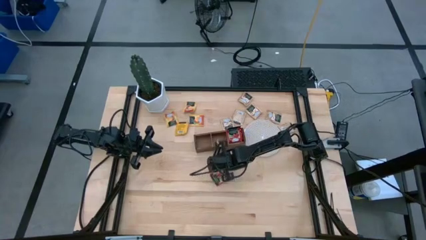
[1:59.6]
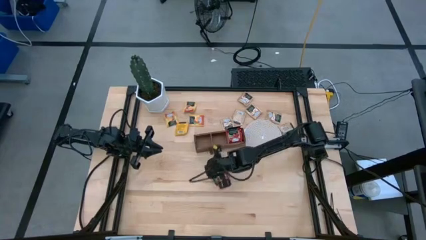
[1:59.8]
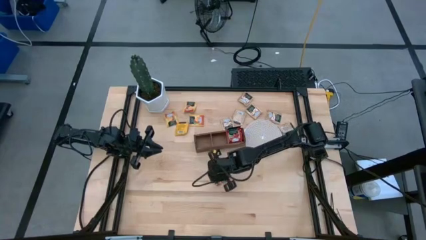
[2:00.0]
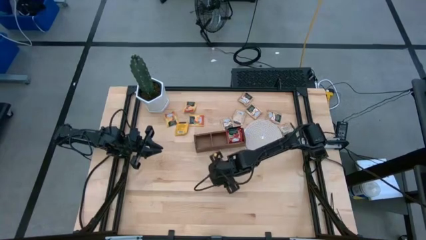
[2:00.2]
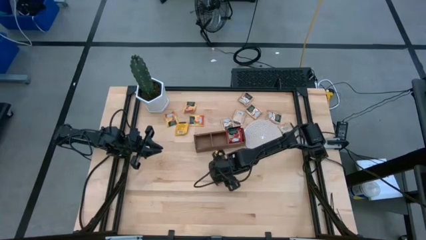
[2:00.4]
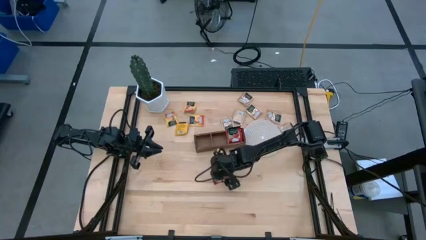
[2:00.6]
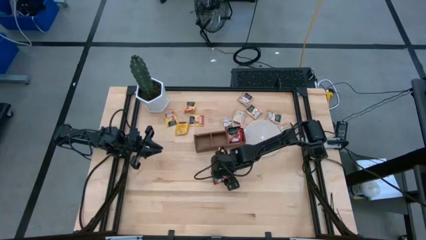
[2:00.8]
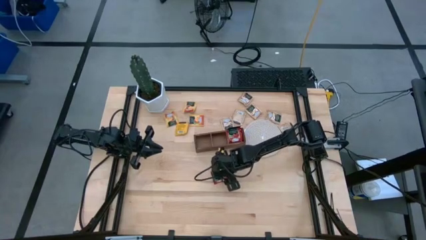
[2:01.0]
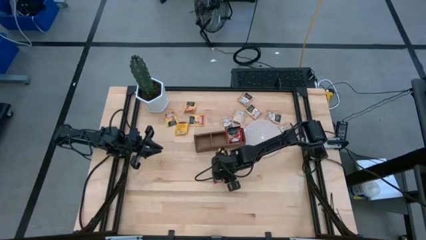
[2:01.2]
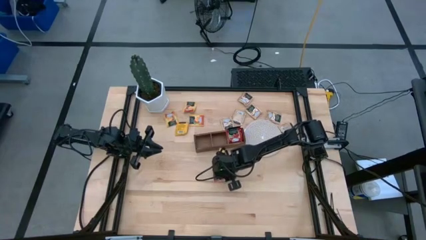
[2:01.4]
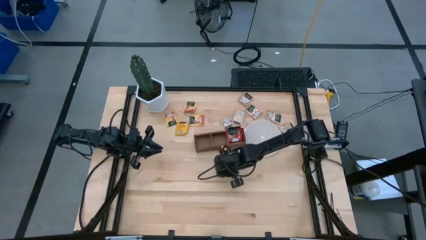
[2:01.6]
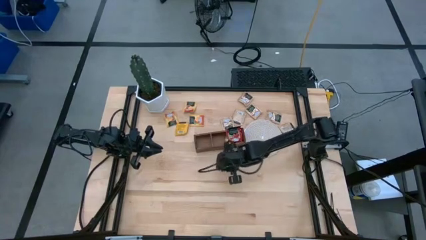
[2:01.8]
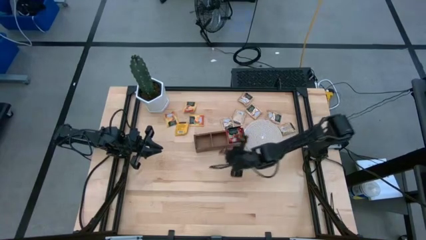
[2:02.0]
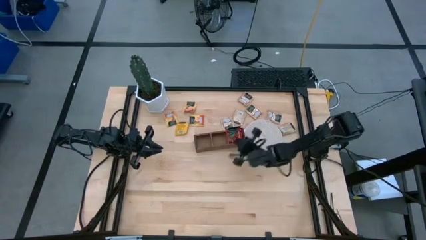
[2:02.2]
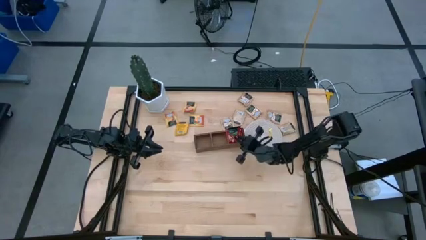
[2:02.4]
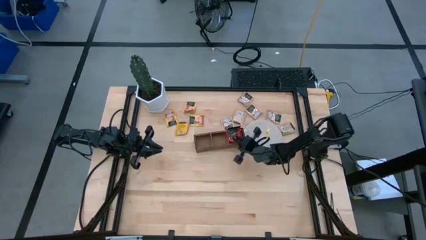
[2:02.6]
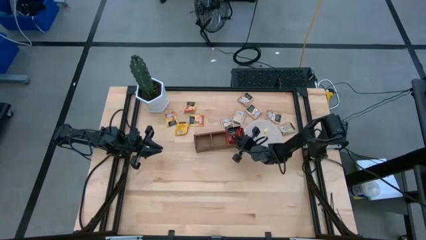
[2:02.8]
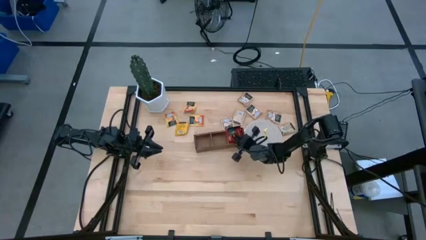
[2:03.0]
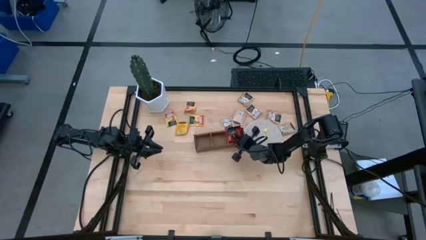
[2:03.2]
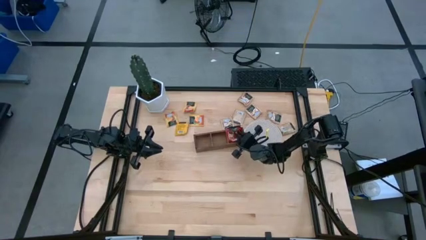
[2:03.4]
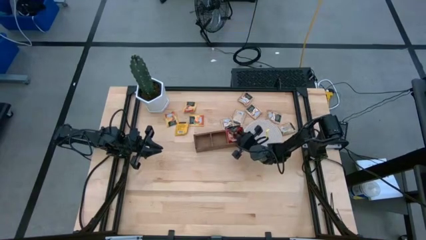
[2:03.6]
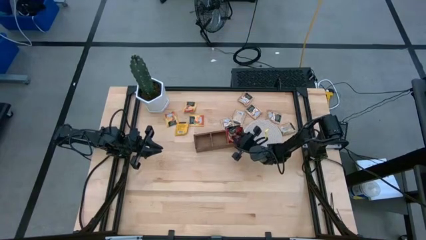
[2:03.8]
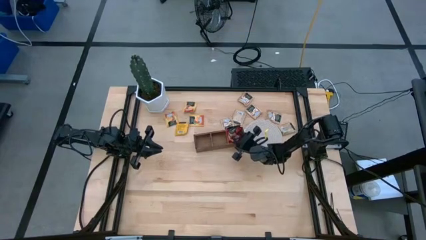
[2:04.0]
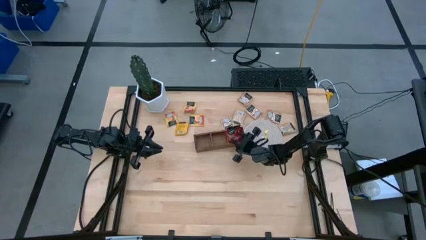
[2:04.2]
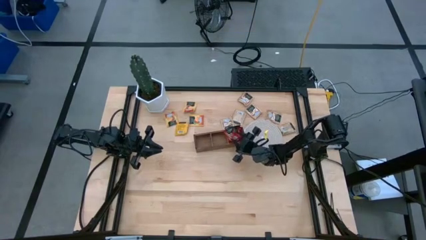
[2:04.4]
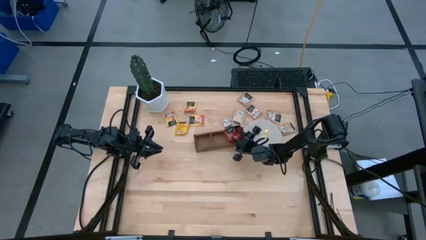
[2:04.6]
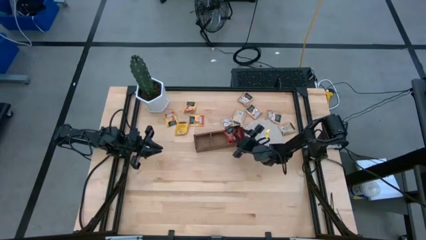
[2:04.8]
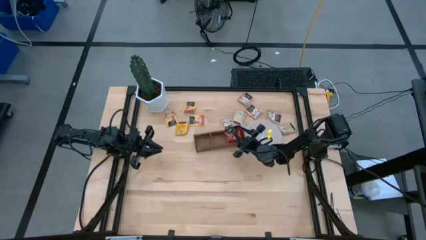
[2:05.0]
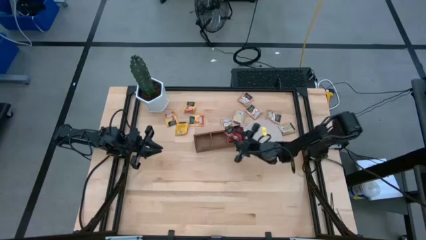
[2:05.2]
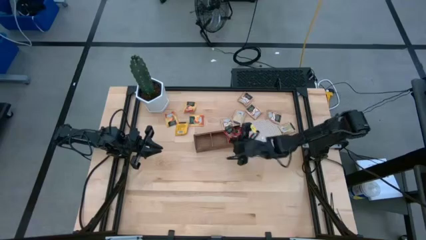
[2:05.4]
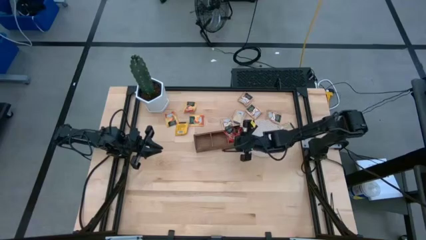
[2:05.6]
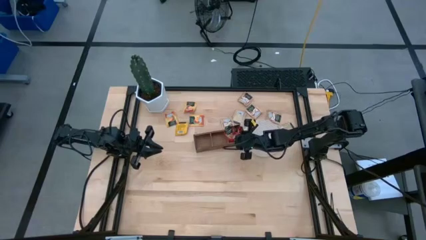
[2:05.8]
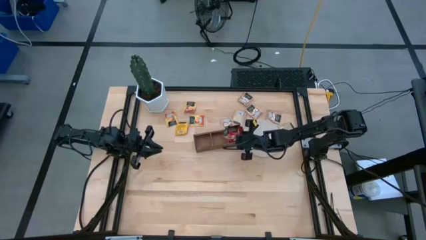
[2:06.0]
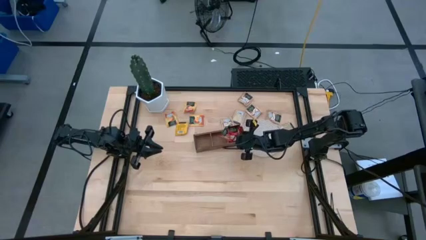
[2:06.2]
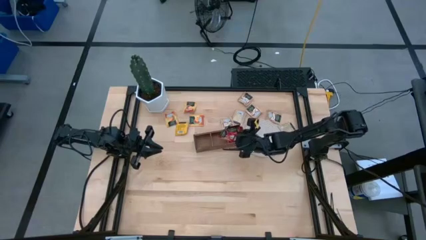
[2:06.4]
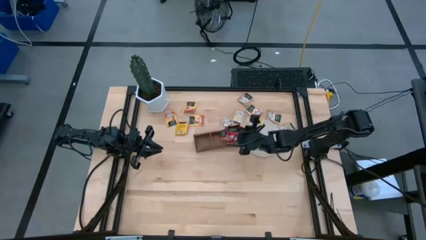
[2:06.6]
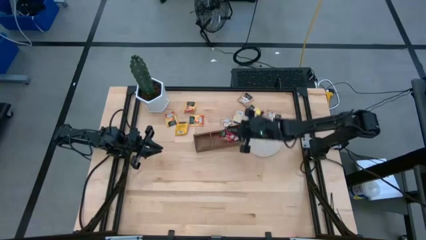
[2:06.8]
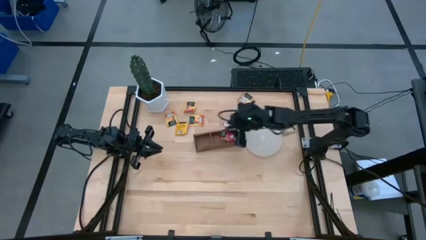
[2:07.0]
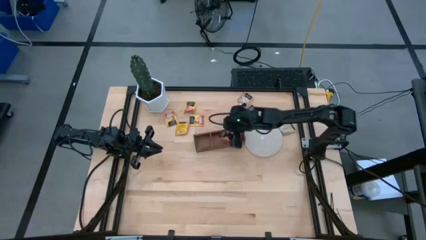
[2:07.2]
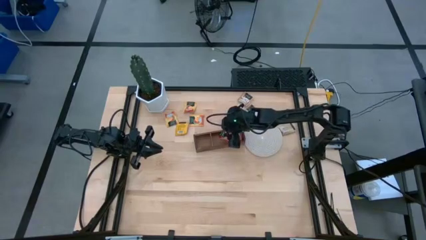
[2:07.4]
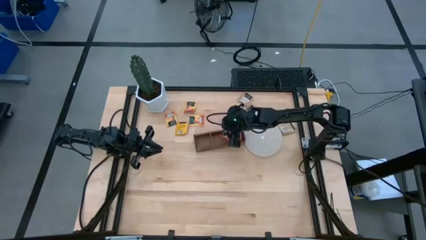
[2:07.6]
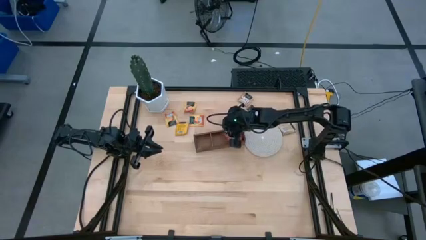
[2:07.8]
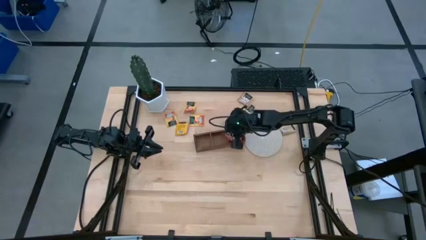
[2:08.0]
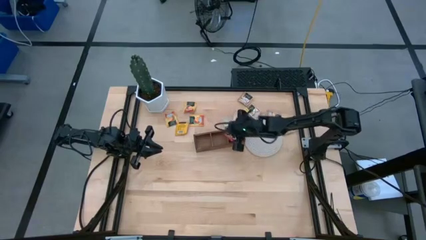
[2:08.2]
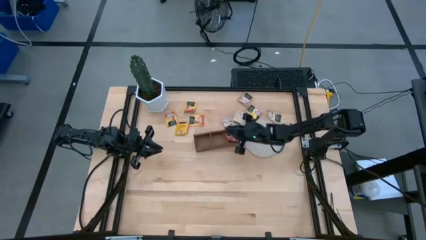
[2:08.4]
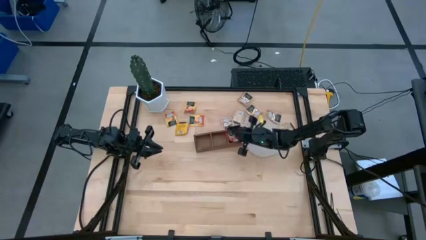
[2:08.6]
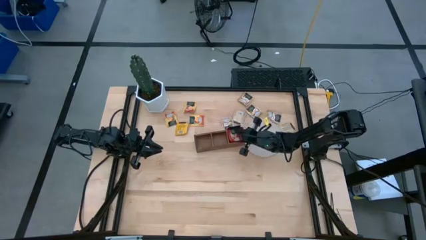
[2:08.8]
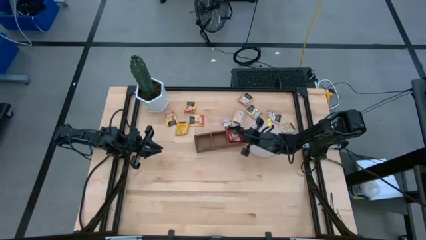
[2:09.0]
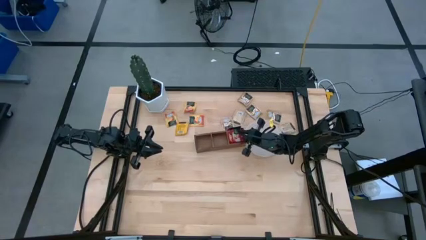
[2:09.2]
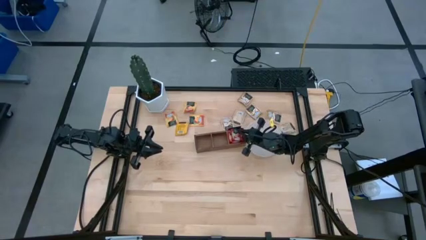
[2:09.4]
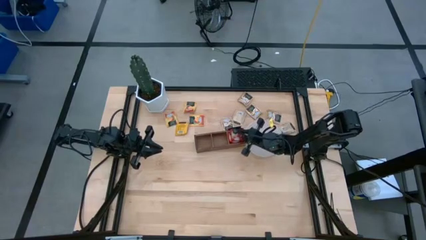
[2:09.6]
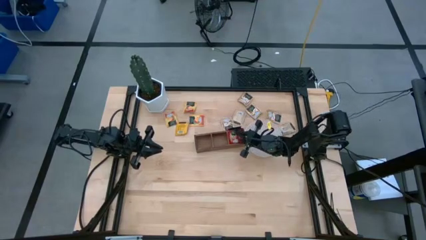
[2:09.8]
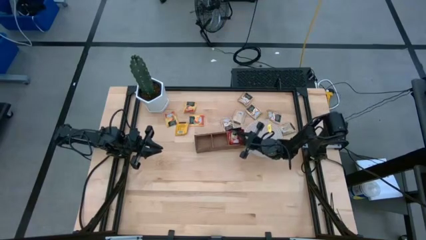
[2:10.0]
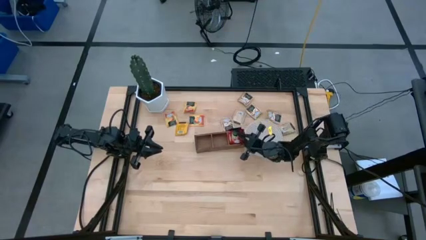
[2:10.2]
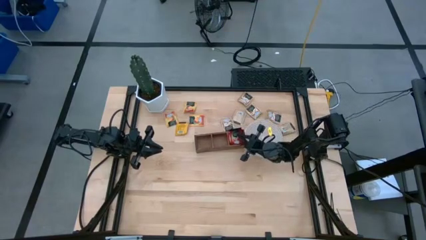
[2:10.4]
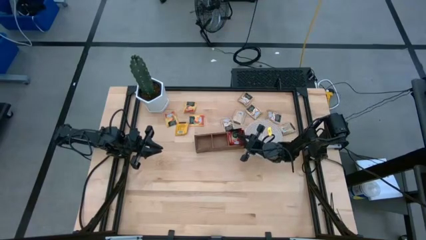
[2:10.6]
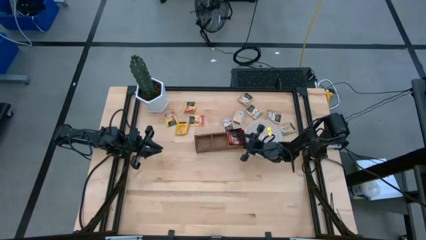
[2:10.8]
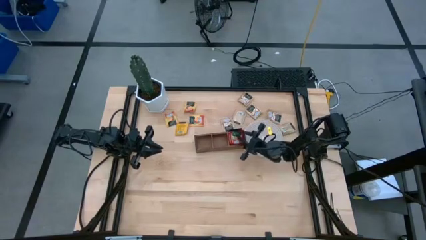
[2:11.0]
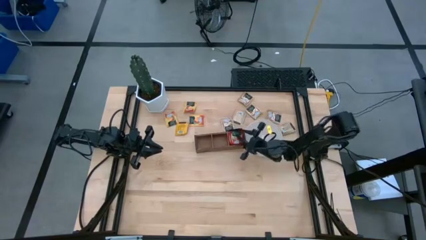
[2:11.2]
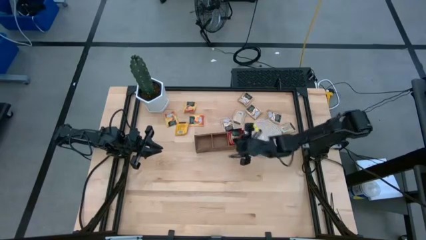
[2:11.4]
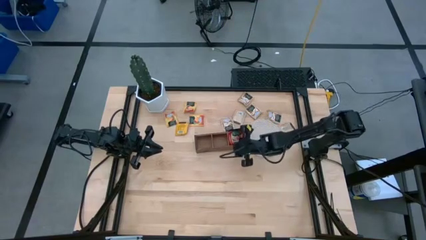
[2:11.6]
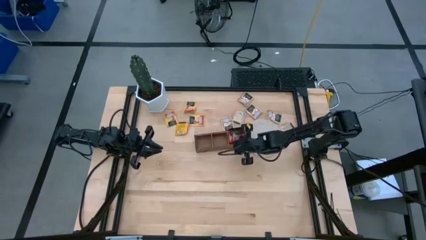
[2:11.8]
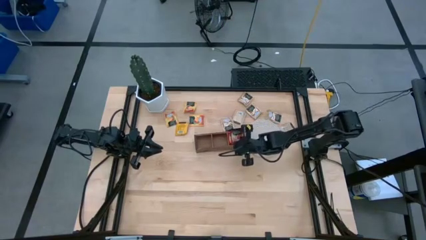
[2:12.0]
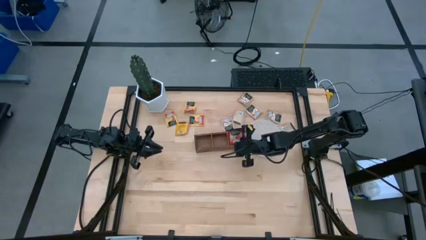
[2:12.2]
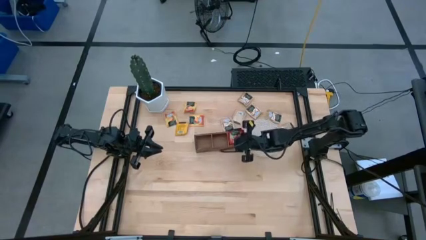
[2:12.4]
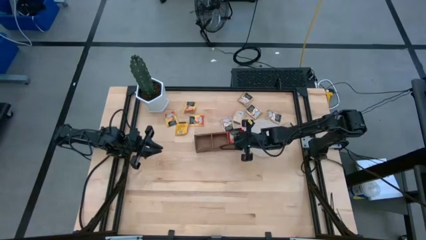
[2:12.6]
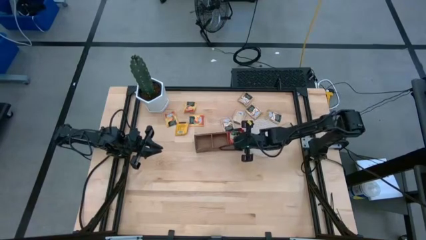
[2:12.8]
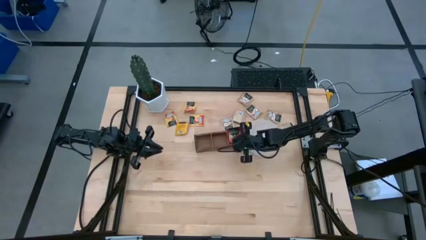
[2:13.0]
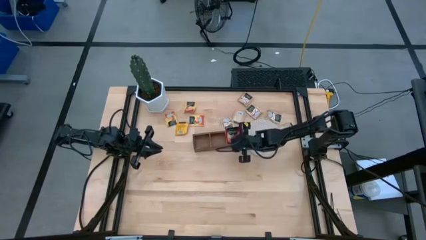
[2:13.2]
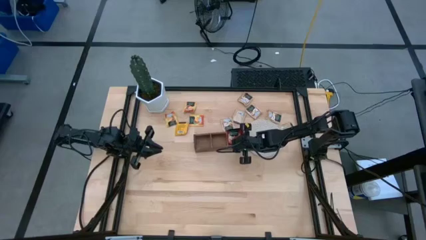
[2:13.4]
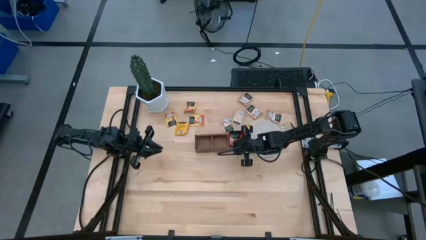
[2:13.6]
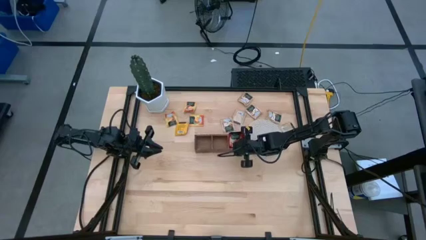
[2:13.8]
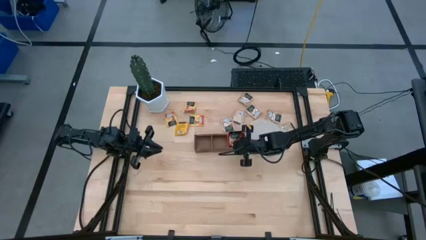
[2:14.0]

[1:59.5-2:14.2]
Task: Pick & Place Tea
Put the red tea bag into the right section of the wooden organizer

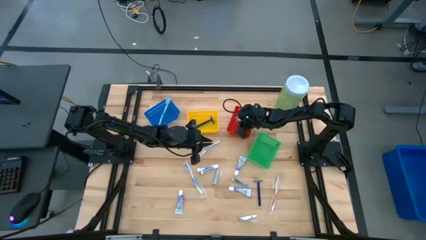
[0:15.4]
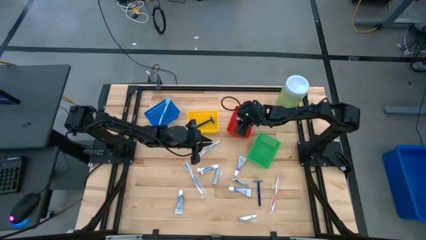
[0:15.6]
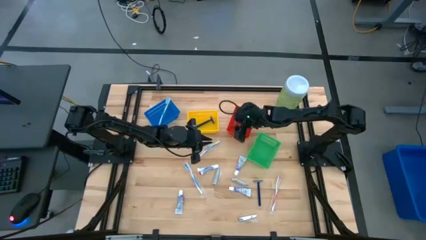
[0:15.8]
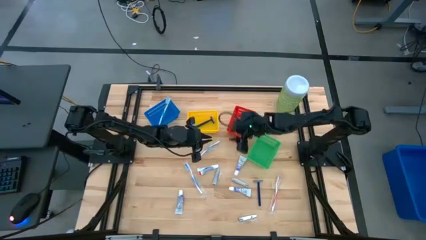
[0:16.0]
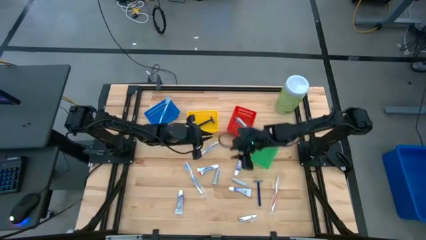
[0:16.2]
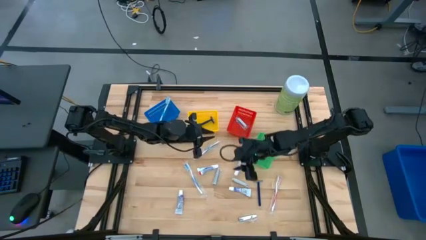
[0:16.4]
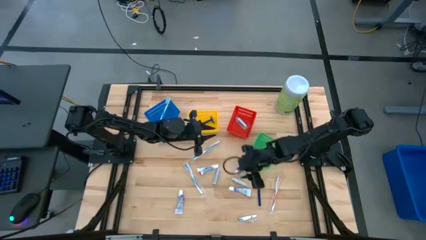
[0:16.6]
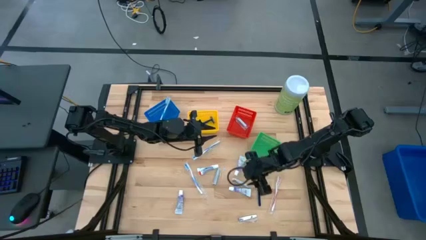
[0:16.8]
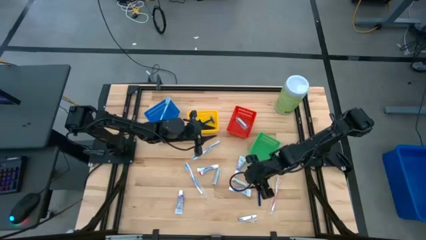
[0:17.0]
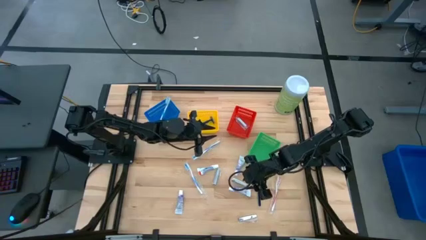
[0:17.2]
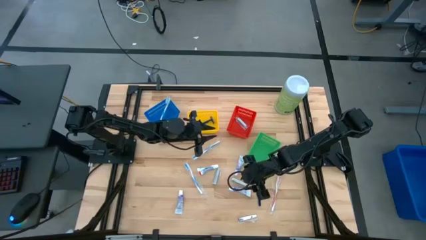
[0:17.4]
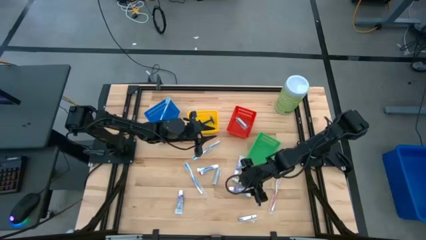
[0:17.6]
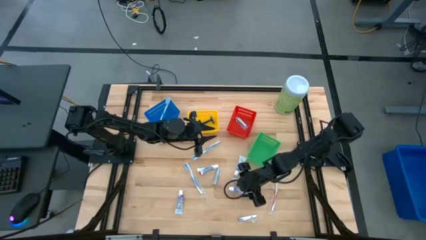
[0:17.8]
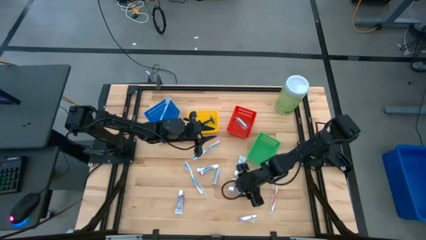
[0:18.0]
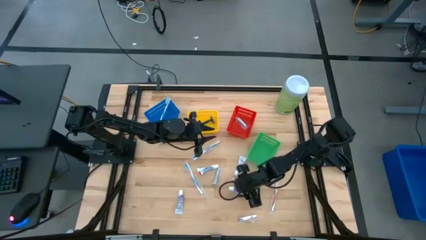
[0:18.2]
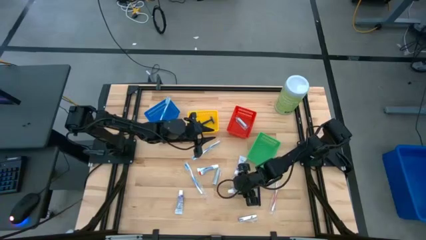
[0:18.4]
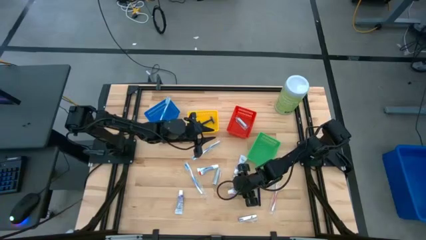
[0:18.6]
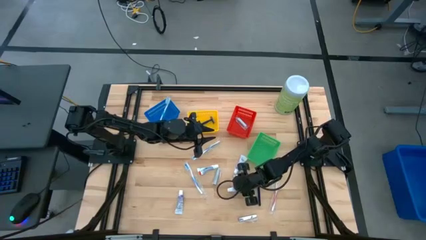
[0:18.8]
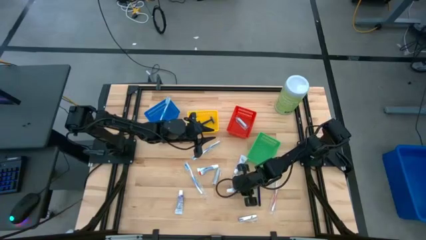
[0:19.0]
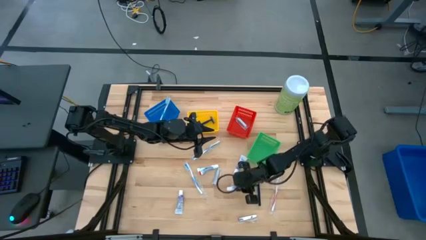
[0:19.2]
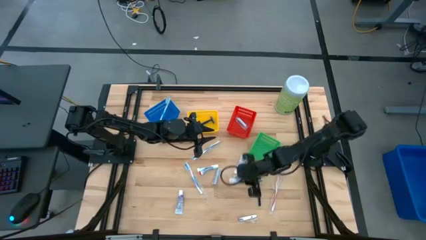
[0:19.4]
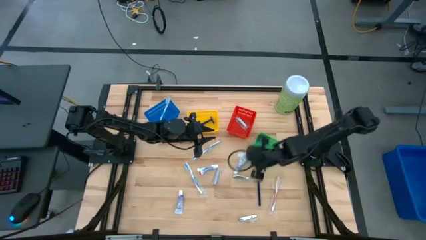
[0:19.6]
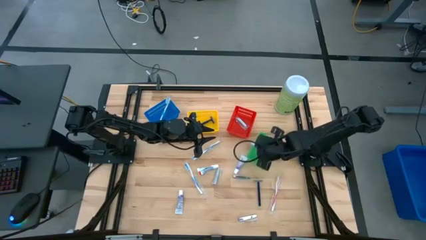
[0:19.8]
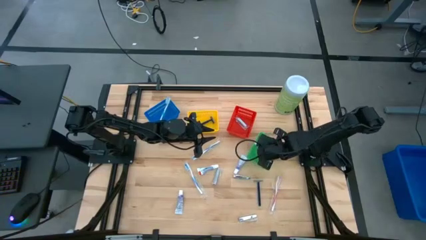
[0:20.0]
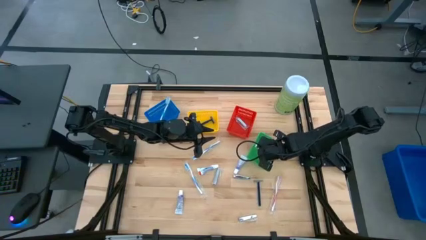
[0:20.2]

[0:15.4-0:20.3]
Task: Pick & Place Travel size toiletries
Put the white toothpaste into the green bin
